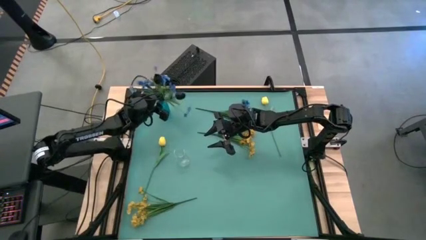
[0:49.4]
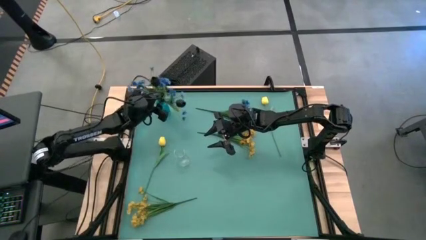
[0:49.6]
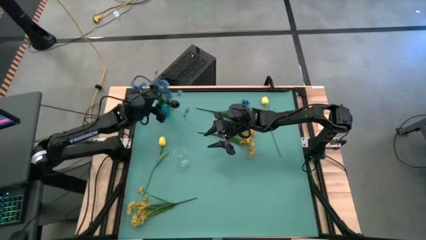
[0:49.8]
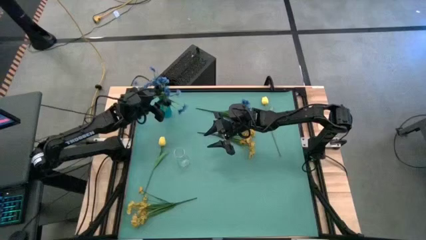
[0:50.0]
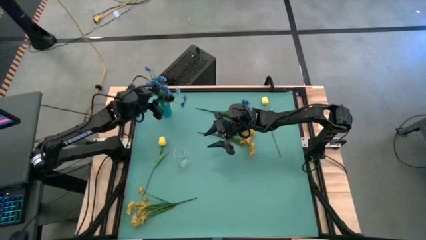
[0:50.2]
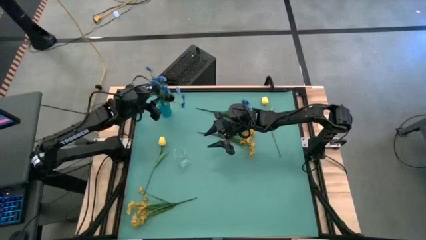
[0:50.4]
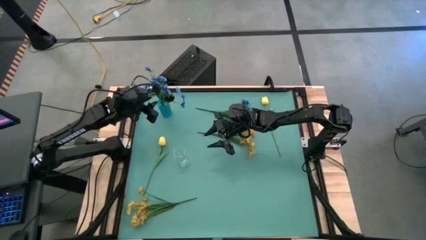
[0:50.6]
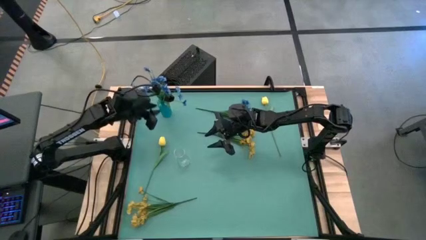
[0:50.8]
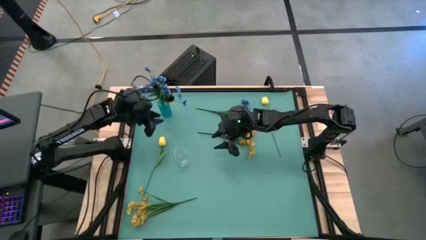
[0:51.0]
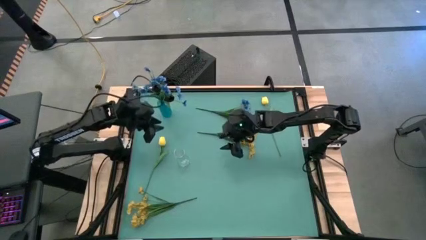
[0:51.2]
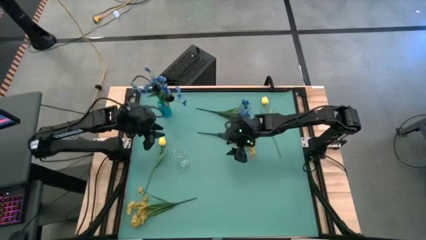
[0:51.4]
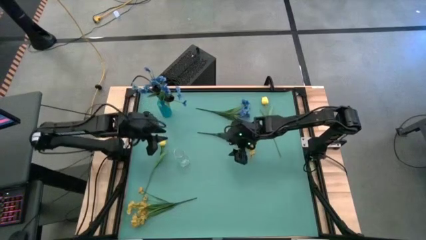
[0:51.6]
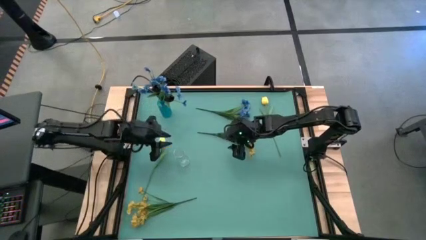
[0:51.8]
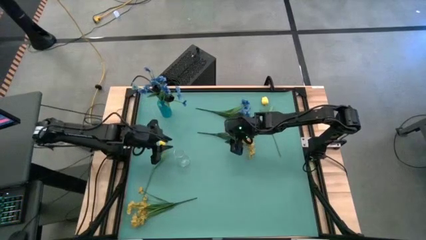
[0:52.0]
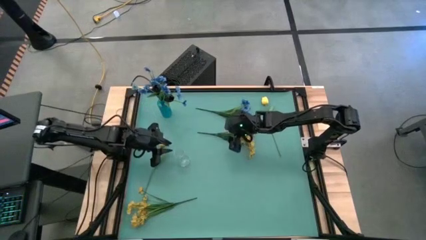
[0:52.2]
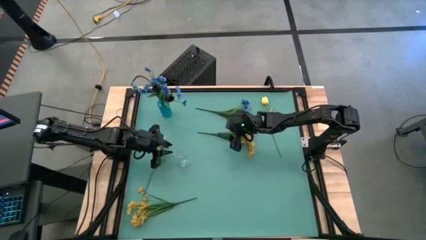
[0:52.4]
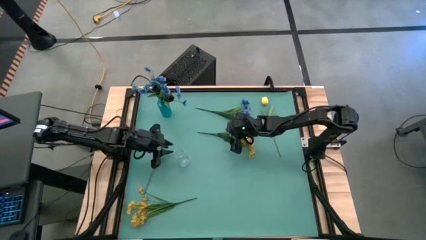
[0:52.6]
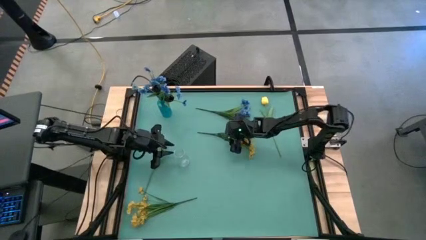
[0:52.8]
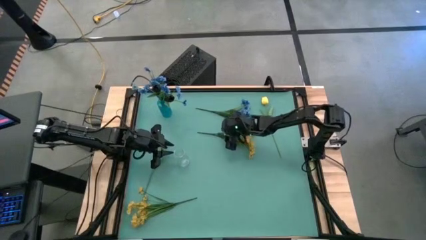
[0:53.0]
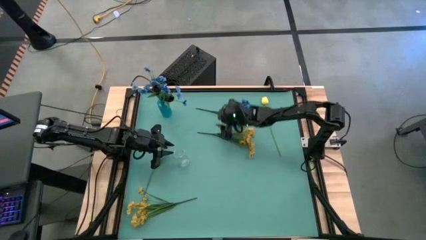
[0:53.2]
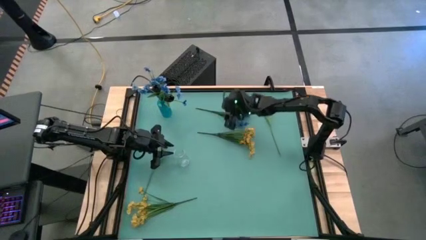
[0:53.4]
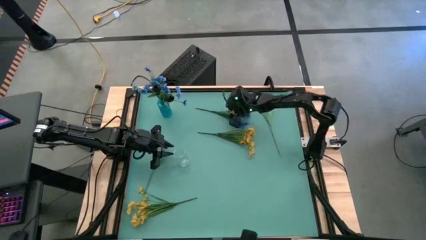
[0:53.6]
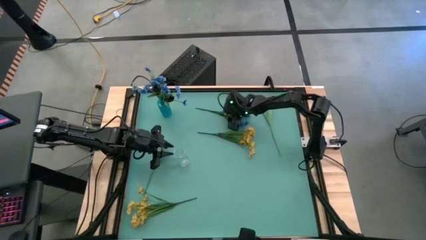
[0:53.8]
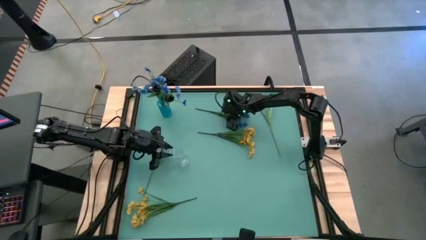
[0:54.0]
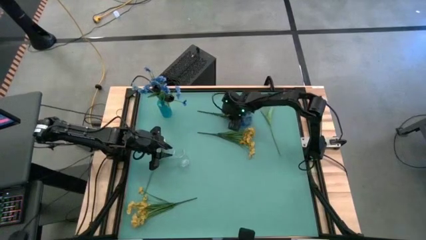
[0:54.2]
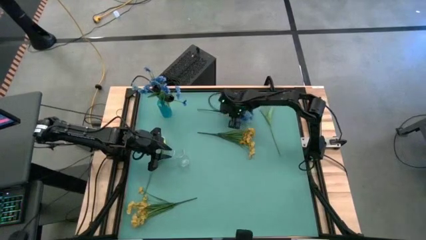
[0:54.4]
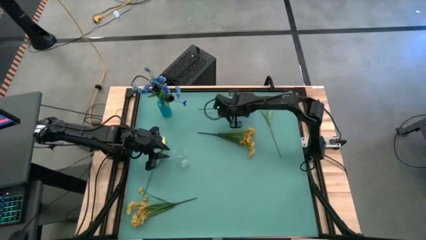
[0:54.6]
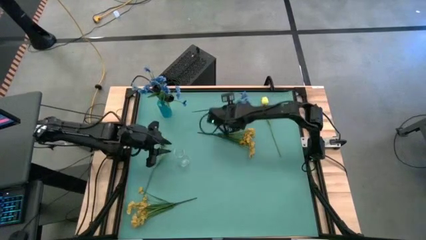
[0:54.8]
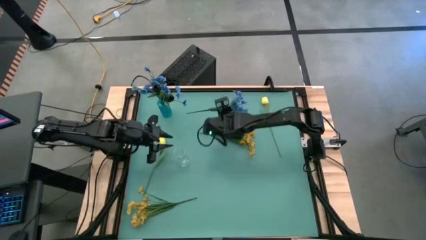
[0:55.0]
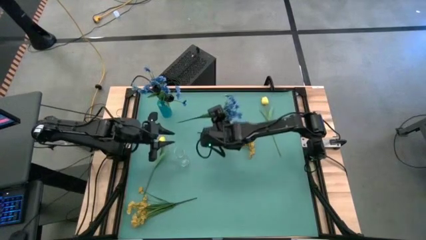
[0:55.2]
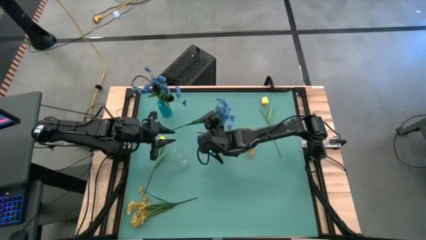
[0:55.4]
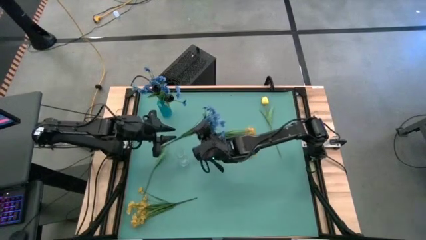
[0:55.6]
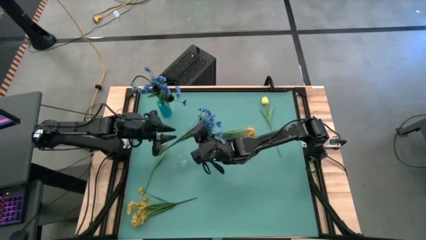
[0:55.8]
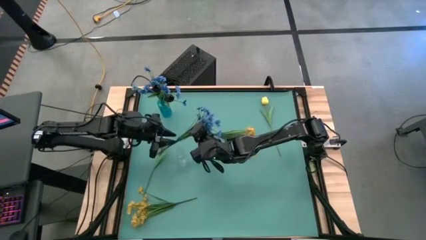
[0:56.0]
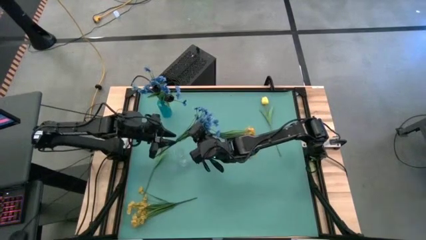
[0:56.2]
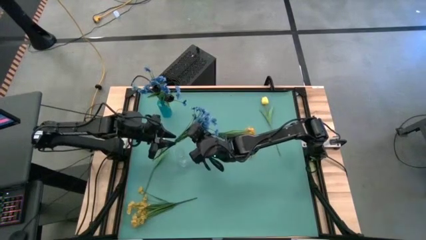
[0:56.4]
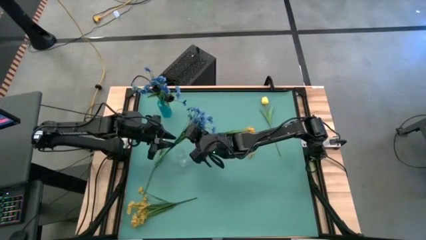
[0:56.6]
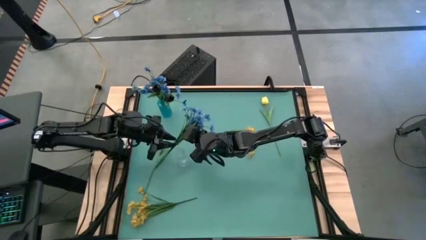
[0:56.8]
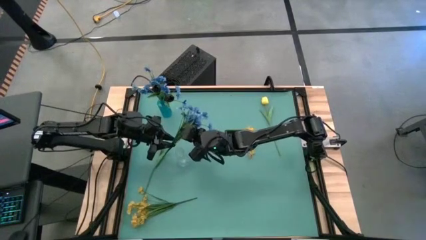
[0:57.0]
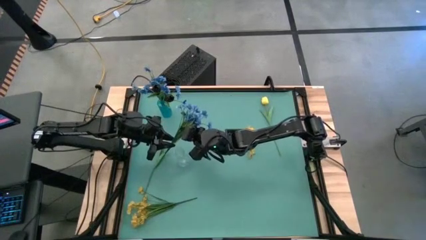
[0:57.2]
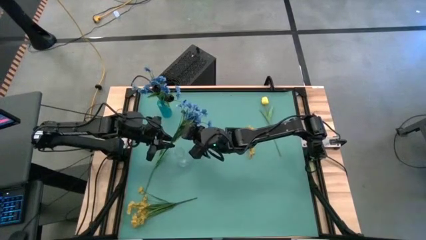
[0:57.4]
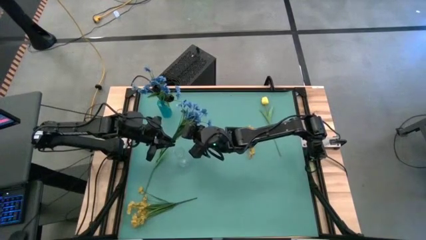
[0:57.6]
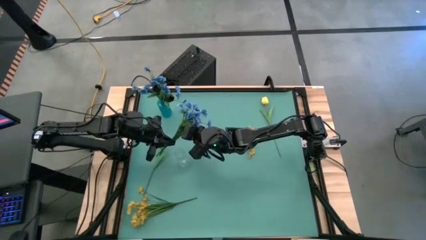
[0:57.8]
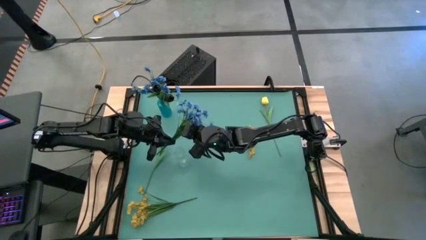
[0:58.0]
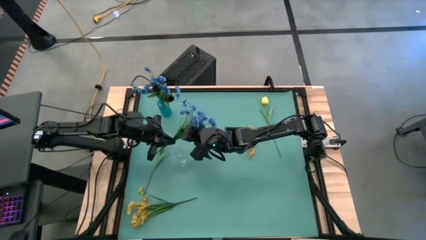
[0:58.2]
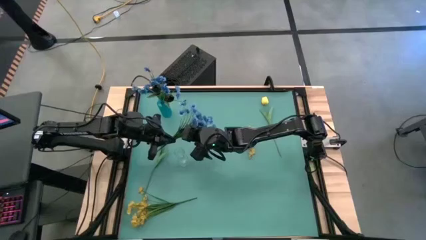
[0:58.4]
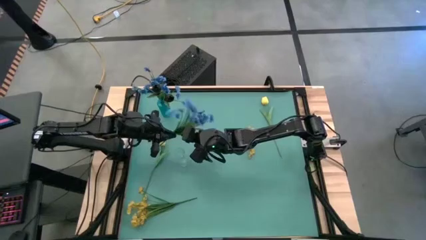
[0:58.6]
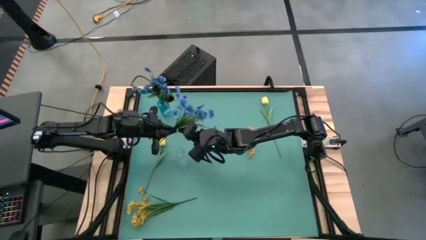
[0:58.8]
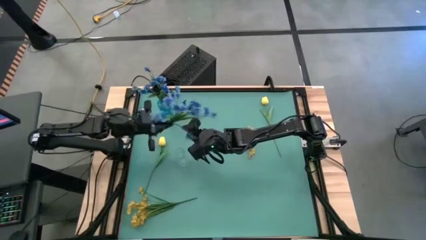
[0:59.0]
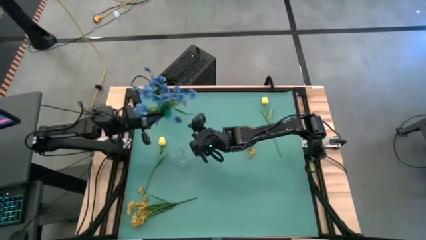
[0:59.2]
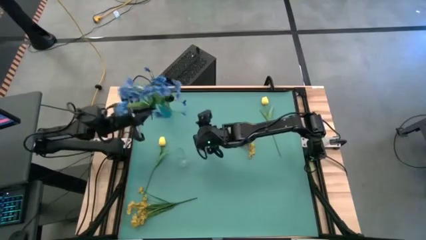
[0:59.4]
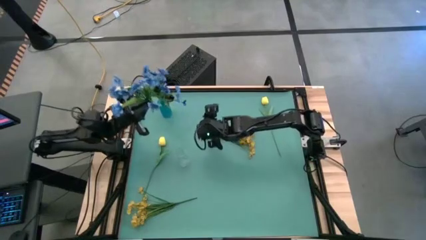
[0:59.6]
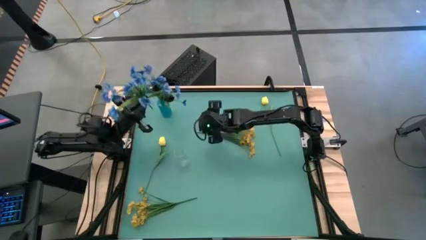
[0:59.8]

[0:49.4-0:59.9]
Task: Sort flowers into vase by color
Put the blue flowers into the blue vase
